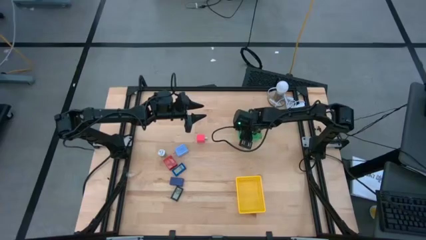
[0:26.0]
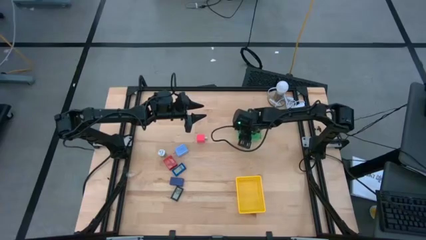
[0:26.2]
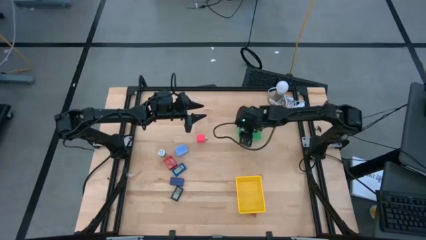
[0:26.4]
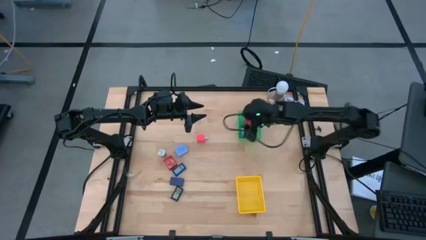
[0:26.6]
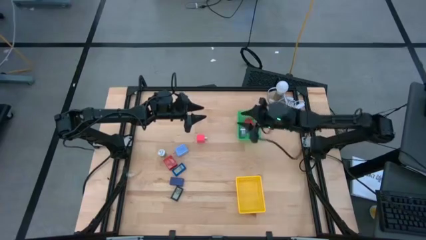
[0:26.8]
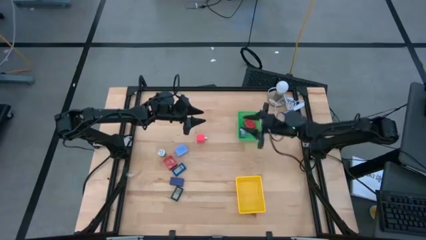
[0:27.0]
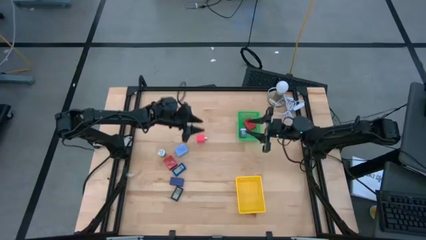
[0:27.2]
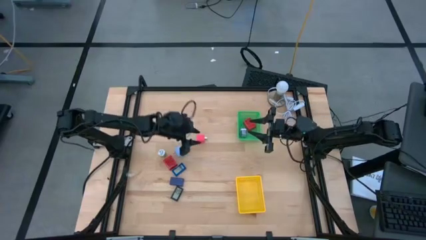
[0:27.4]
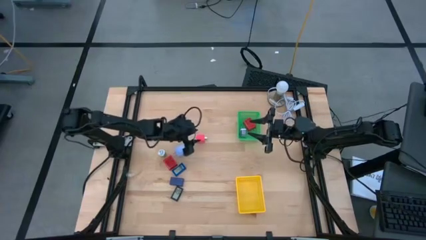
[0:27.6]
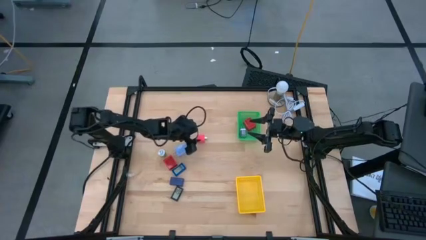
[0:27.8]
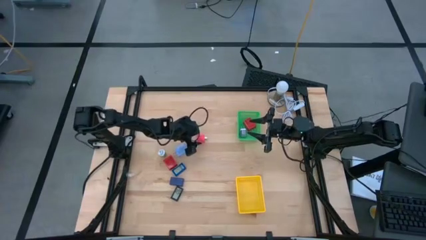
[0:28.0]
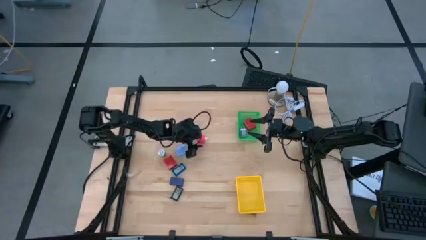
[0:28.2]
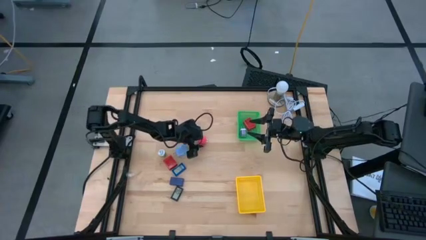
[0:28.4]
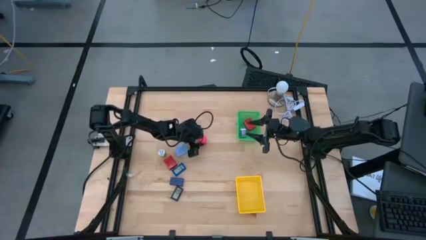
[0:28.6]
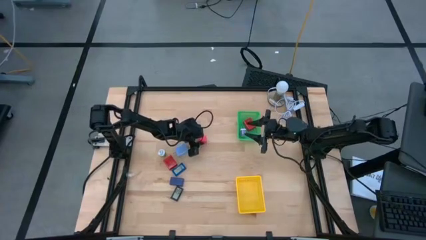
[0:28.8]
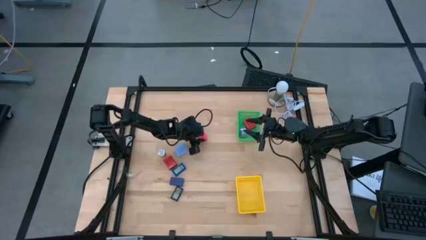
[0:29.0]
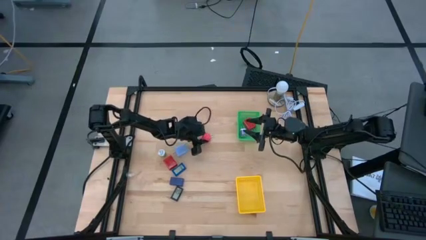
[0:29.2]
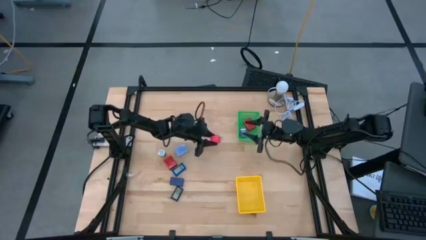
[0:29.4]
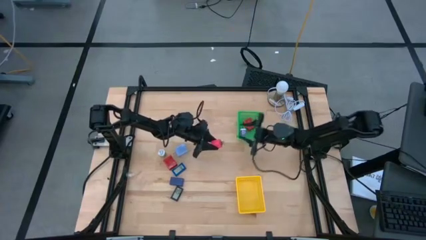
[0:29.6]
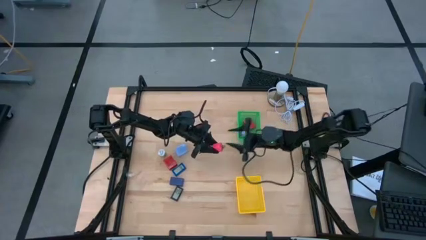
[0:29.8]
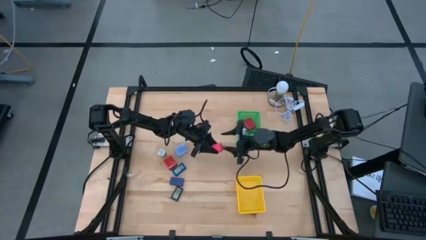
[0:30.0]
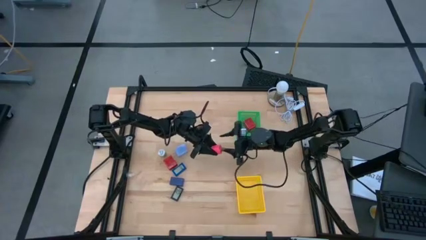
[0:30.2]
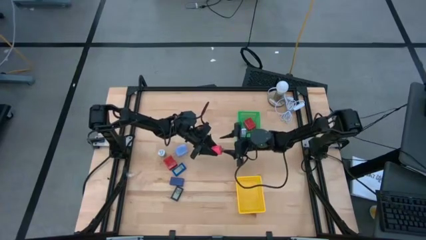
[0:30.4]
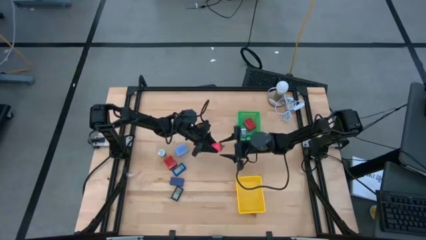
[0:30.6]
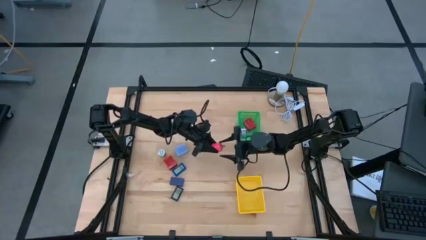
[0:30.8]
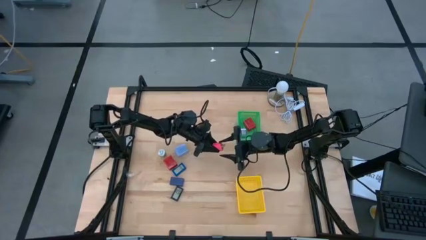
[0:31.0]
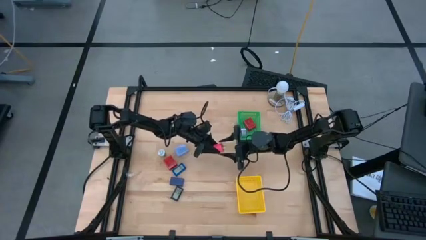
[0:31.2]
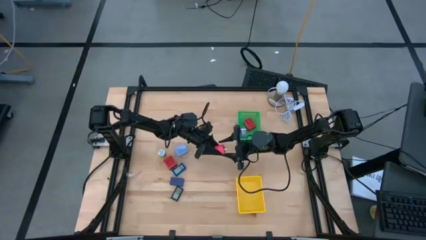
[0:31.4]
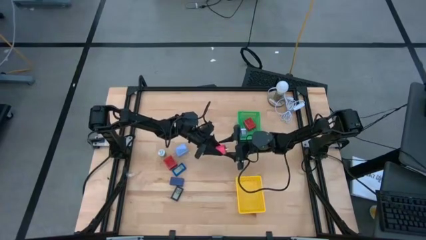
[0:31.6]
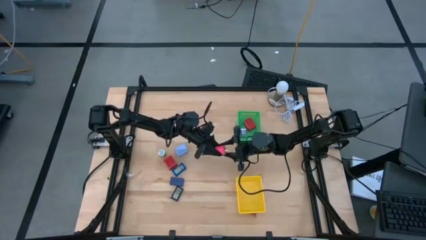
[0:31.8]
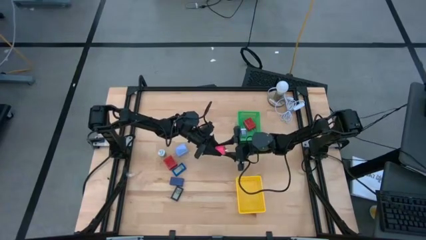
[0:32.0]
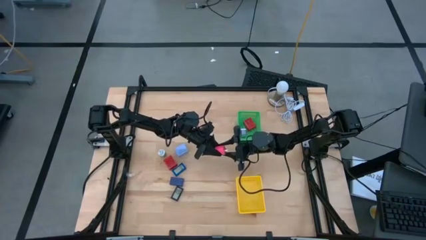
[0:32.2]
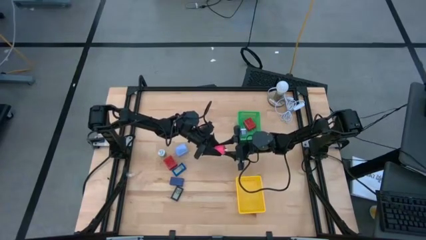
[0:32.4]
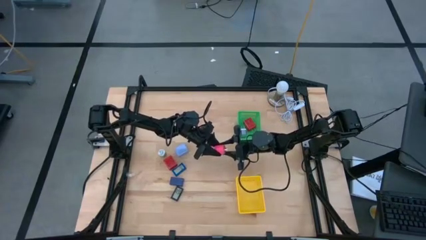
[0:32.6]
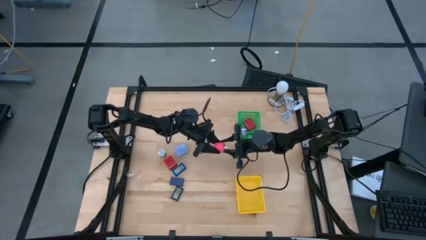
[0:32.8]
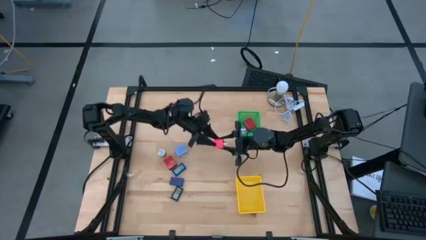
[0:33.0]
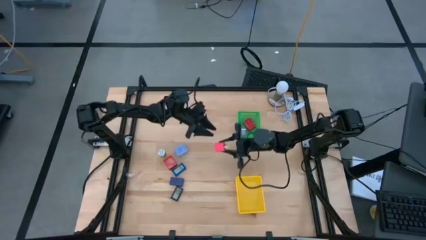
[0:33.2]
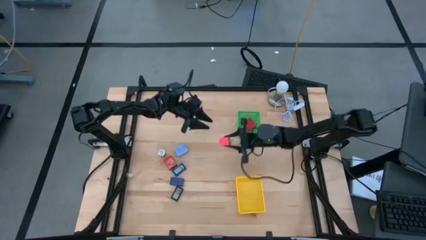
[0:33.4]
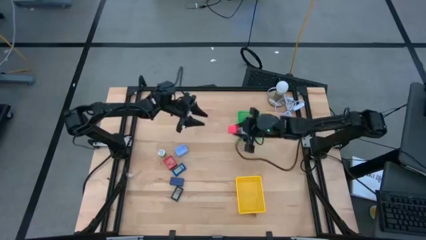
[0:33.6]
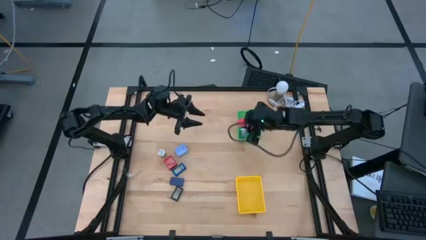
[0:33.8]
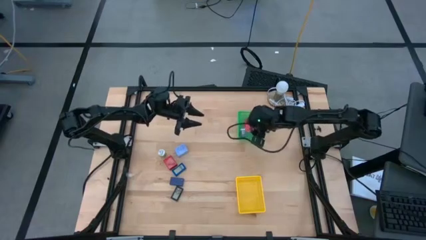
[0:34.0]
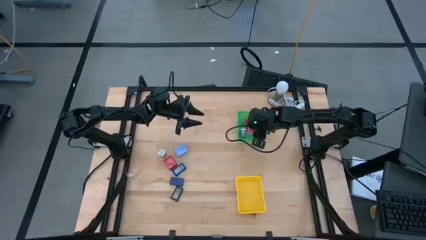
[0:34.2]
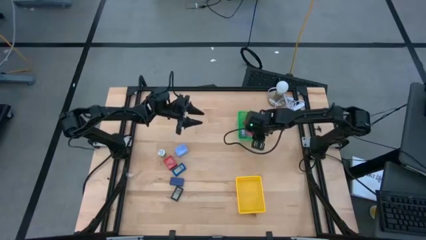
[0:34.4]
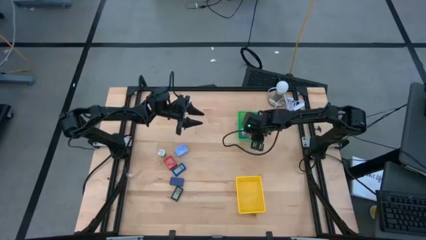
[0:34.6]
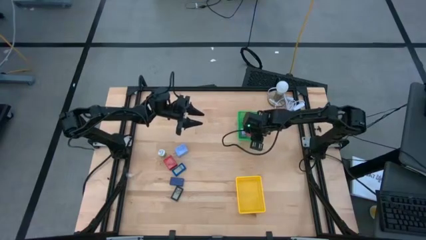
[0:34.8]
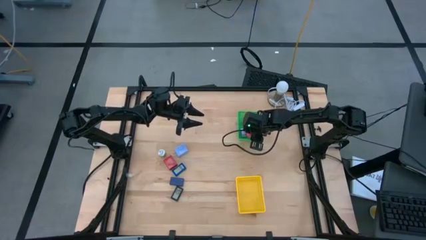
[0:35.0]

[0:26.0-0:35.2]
Task: Pick & Place Office items
Put the pink charger adapter into the green bin
